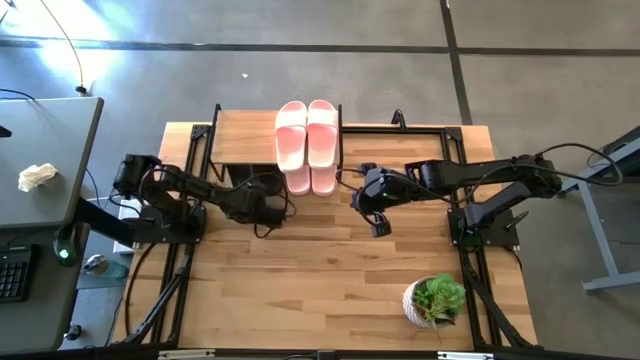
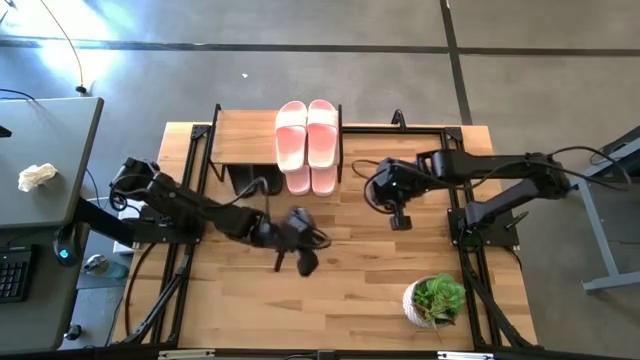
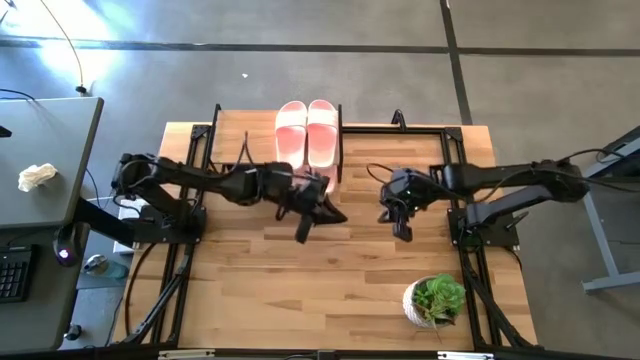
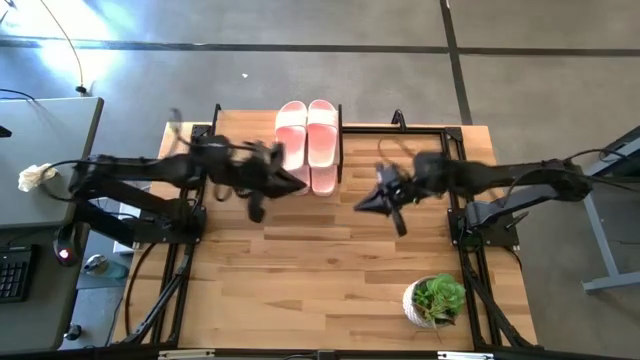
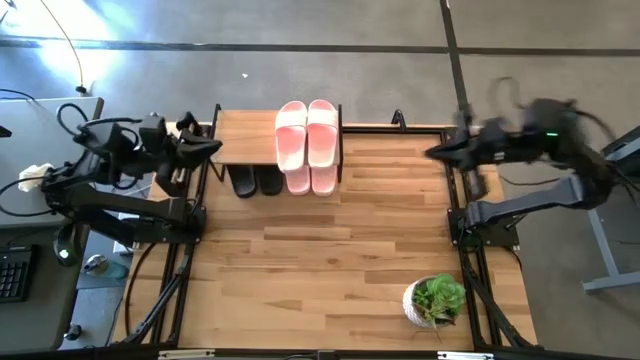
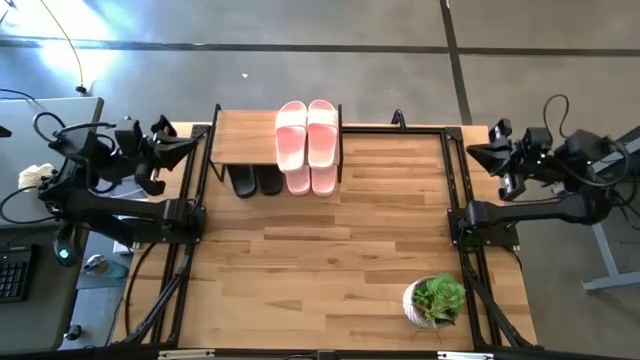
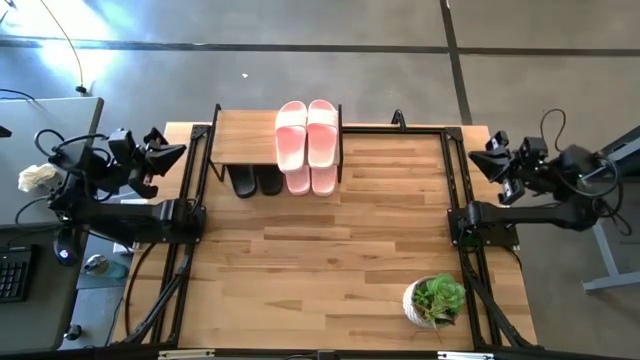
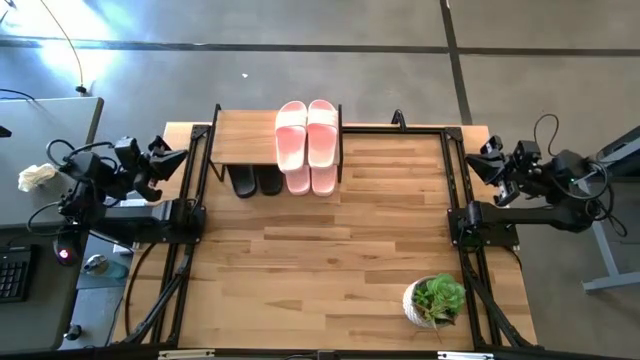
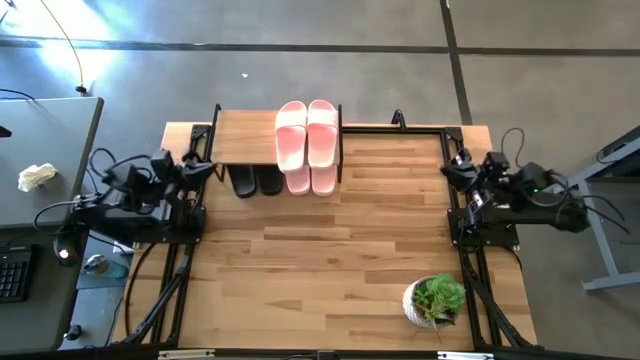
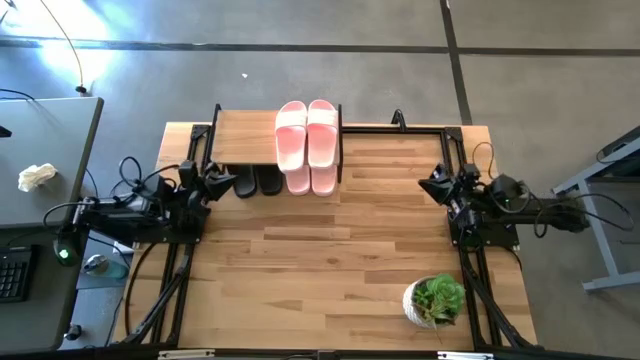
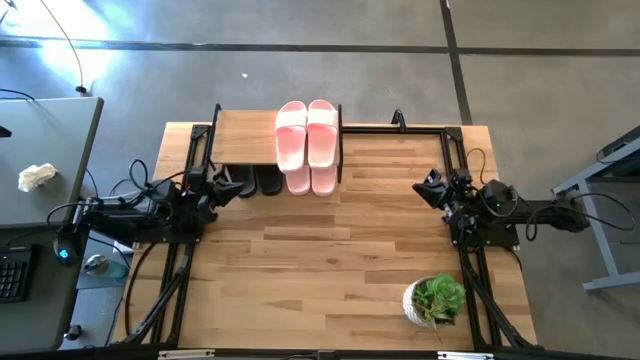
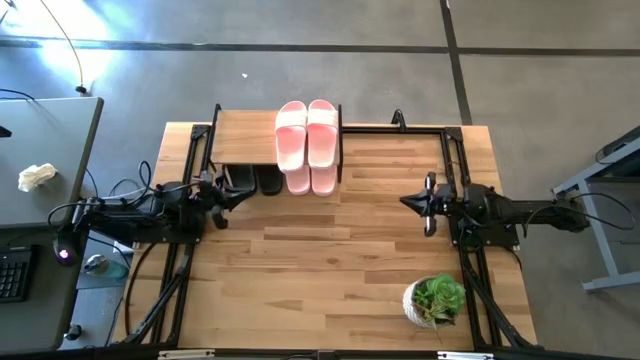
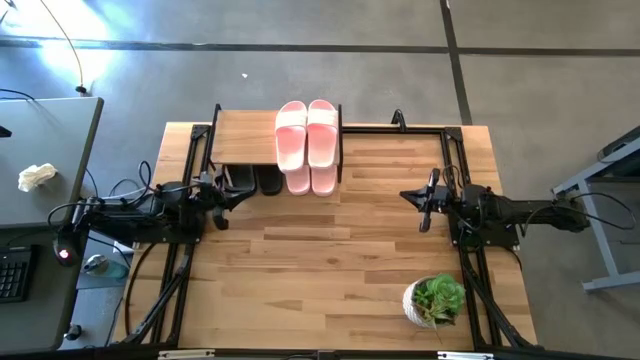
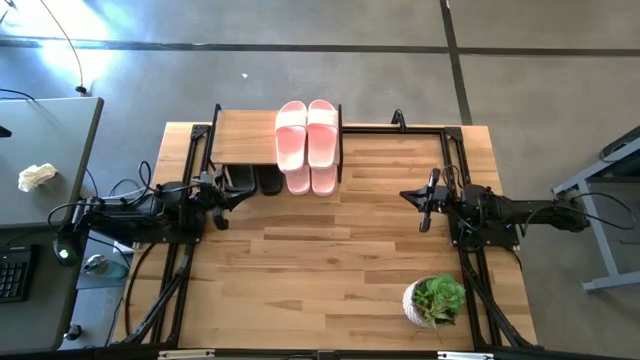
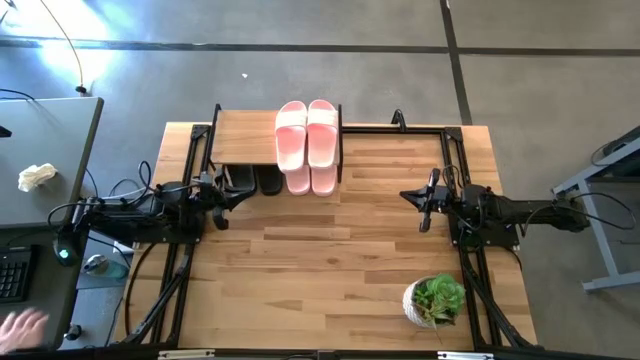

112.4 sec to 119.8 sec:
Task: Pick and place slides into the shelf
Return to Home Position

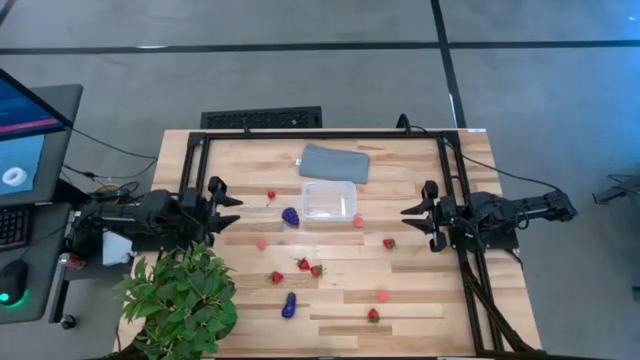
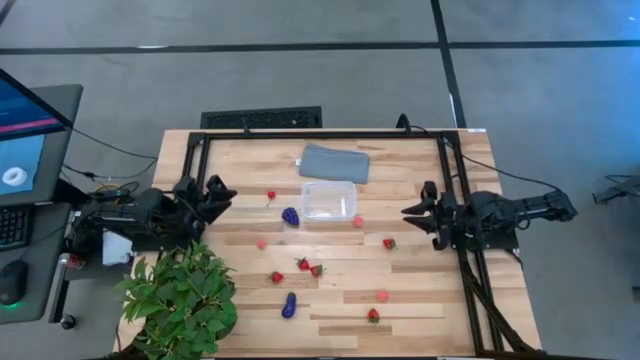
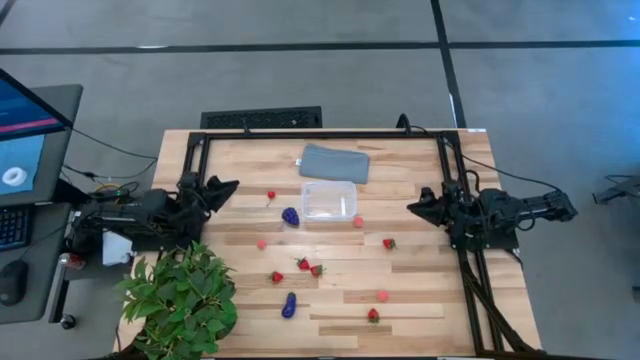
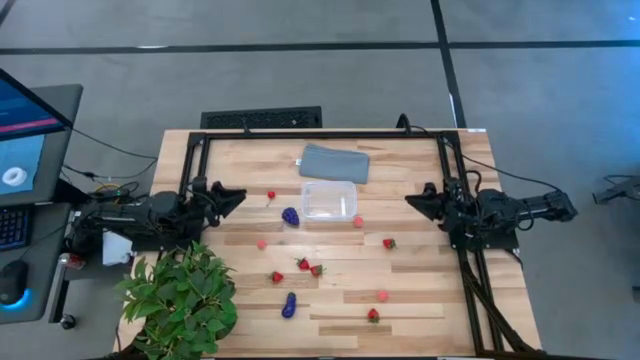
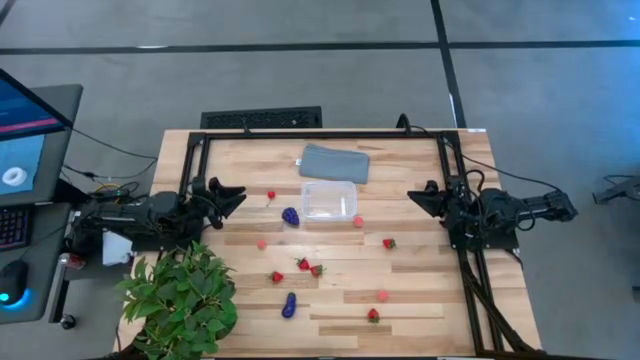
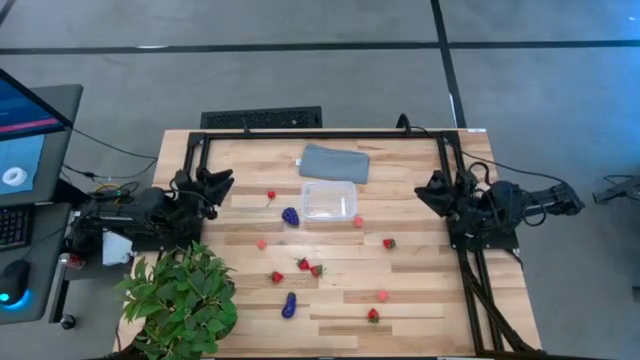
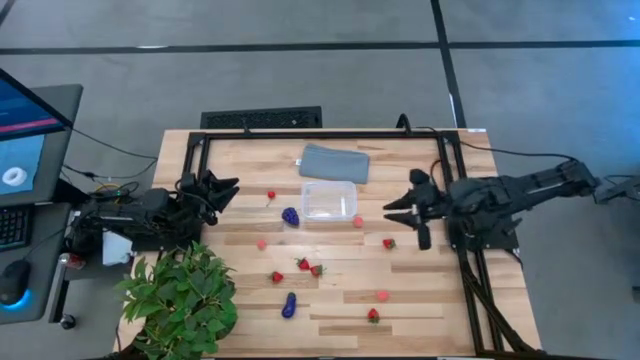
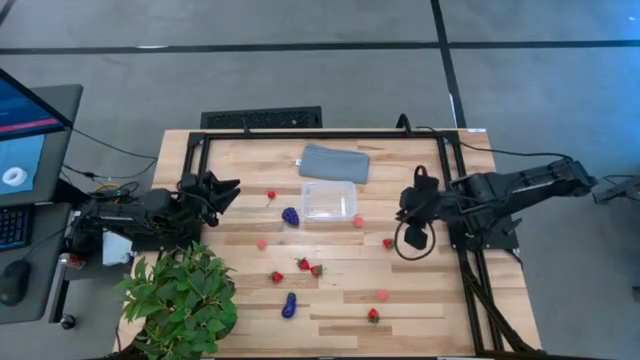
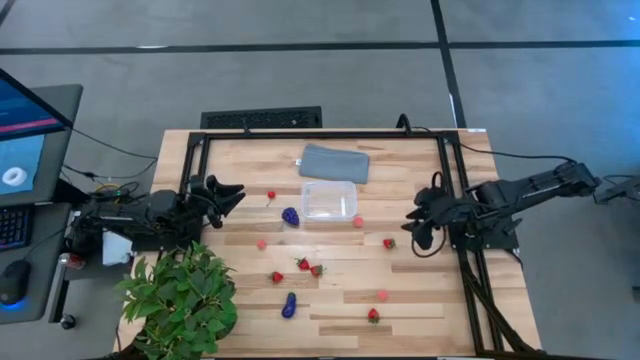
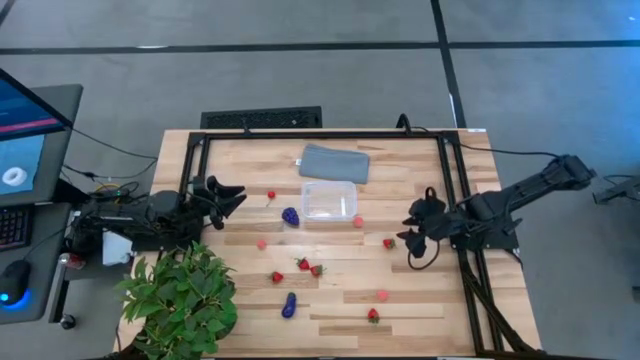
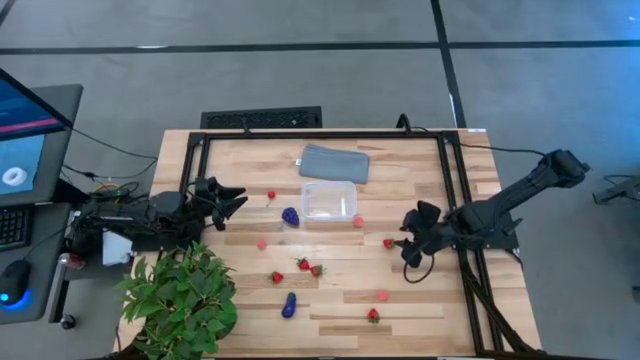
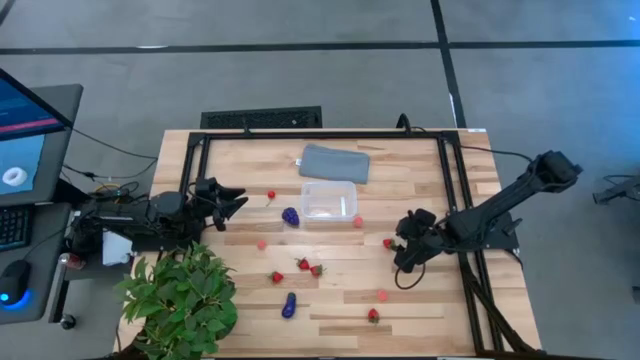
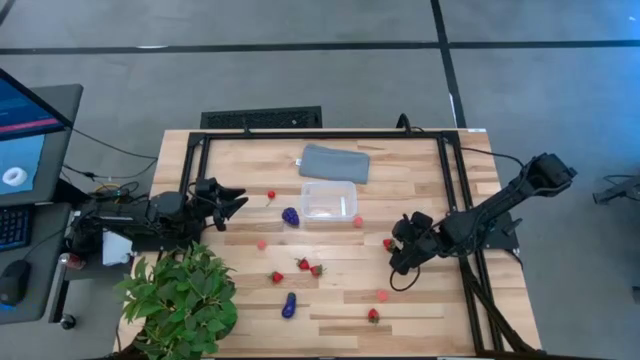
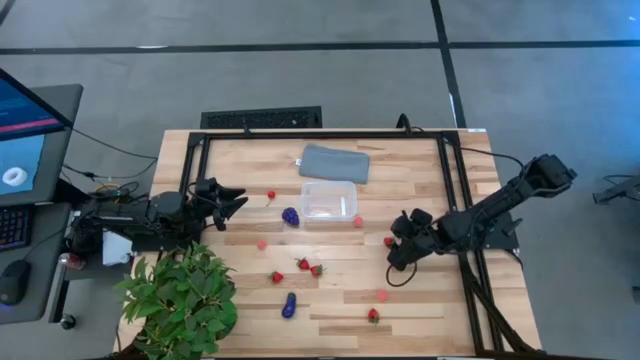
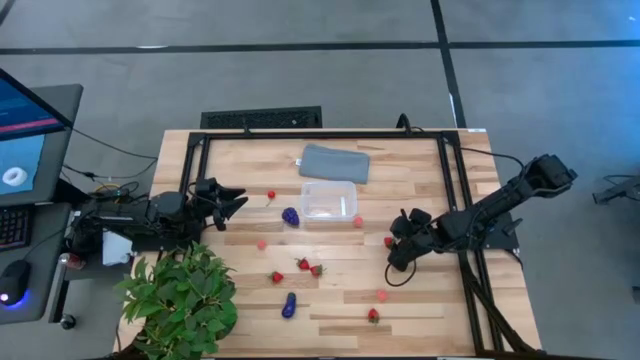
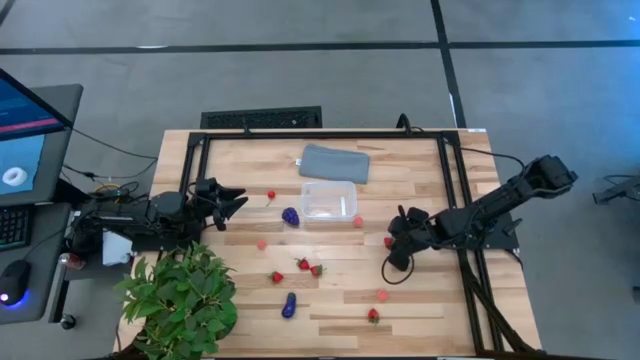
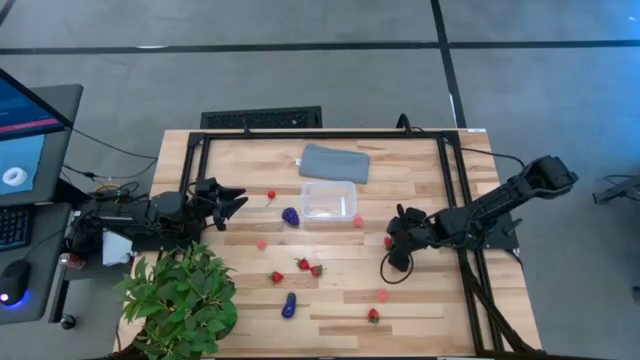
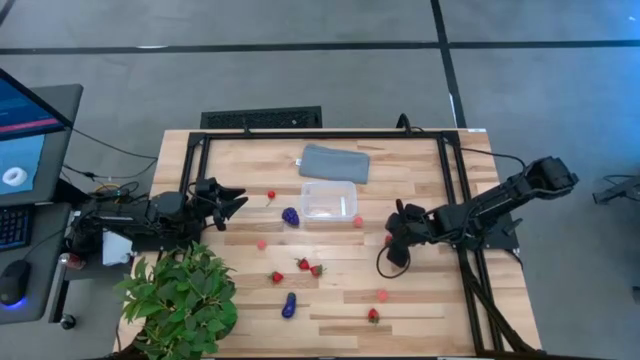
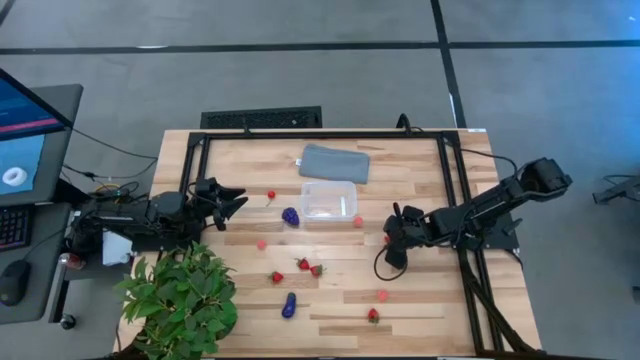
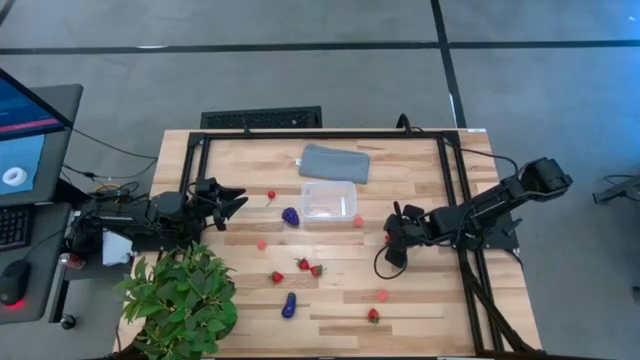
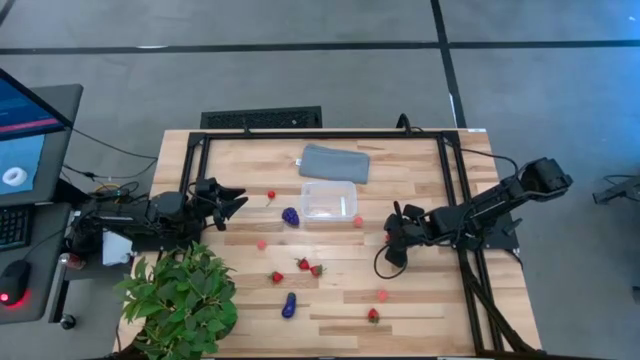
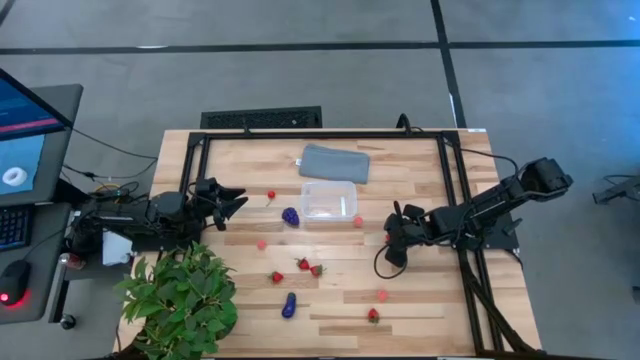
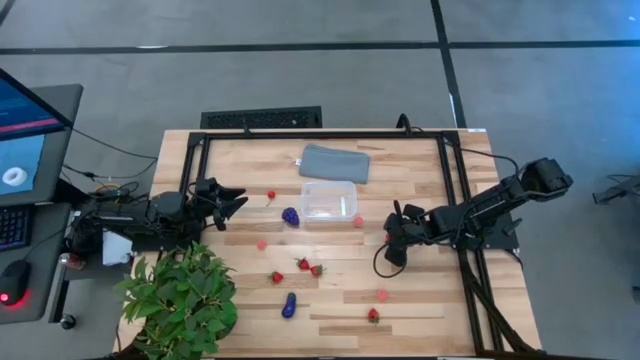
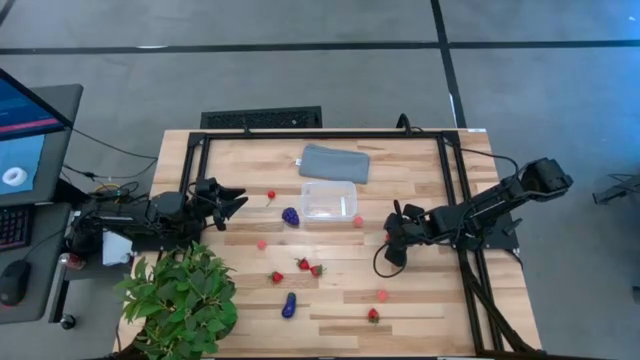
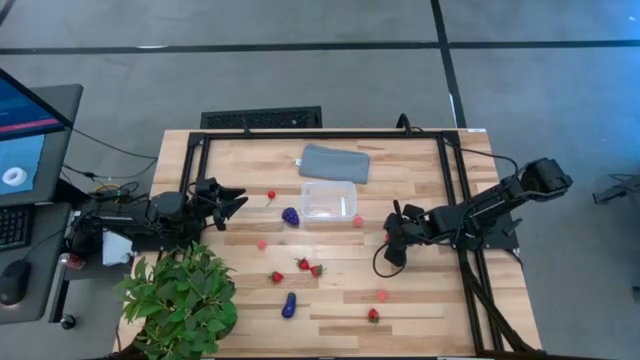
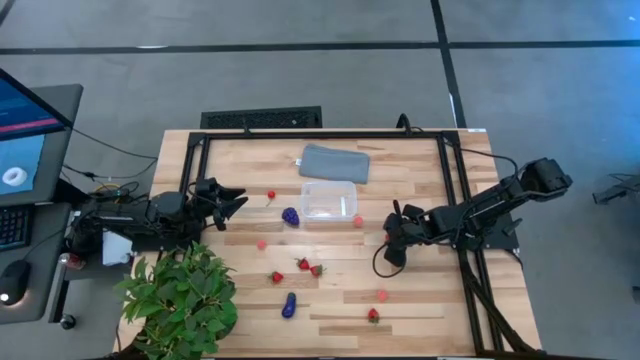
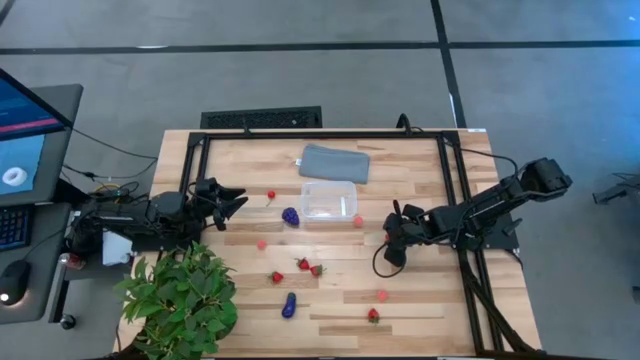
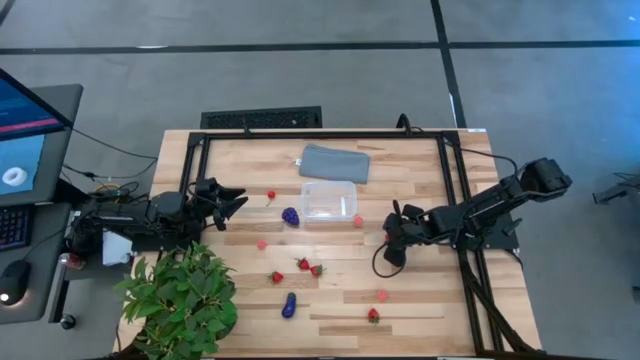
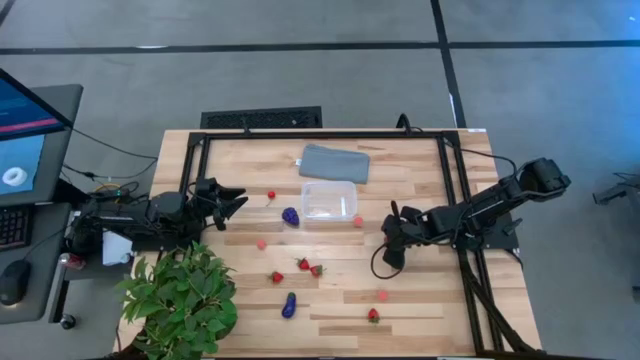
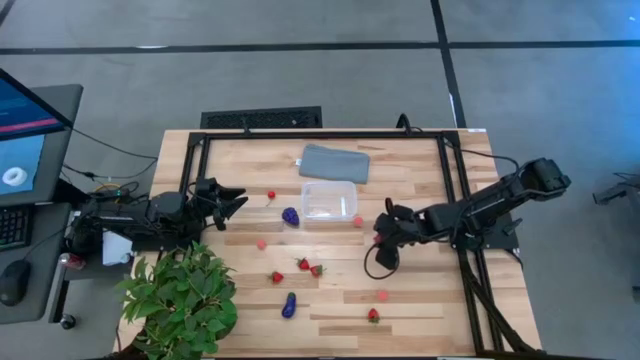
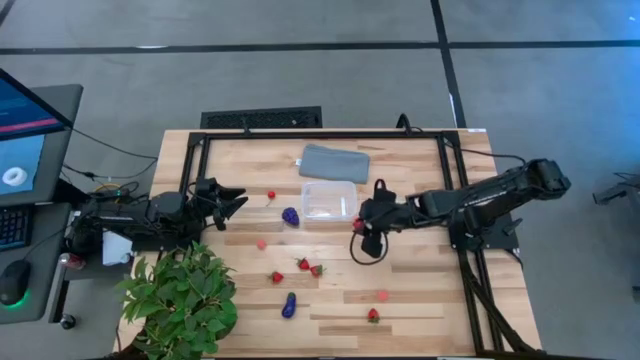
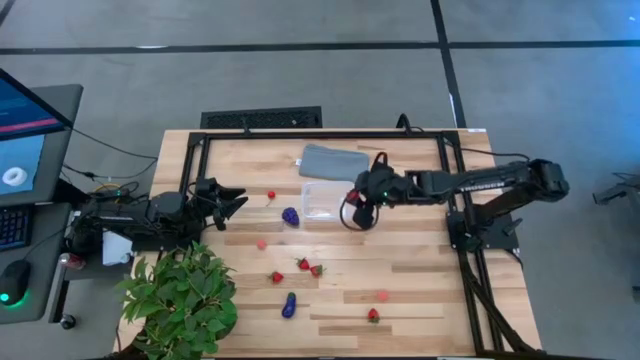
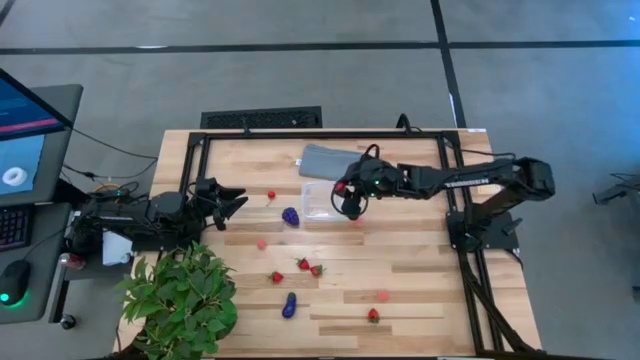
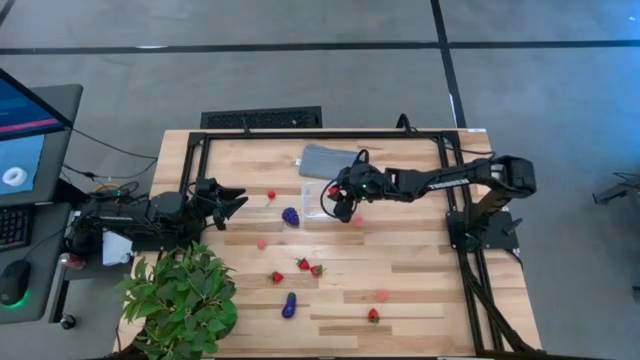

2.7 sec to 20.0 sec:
Task: Pick and placing Produce into tupperware
Put the red strawberry into the transparent bin
